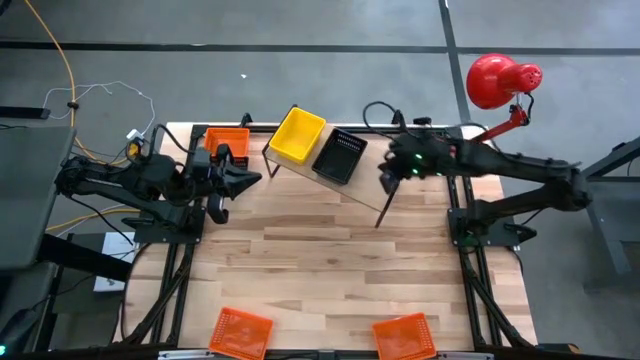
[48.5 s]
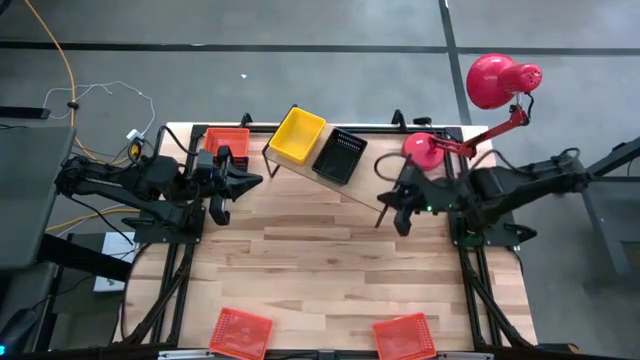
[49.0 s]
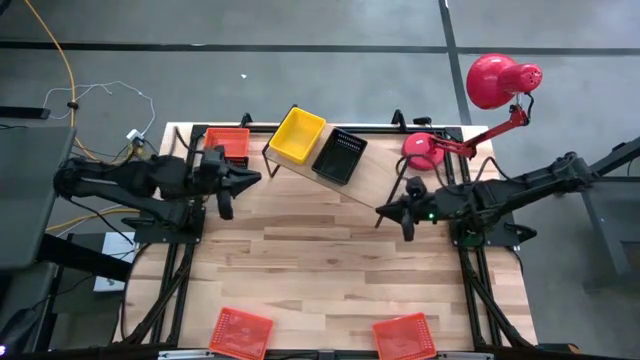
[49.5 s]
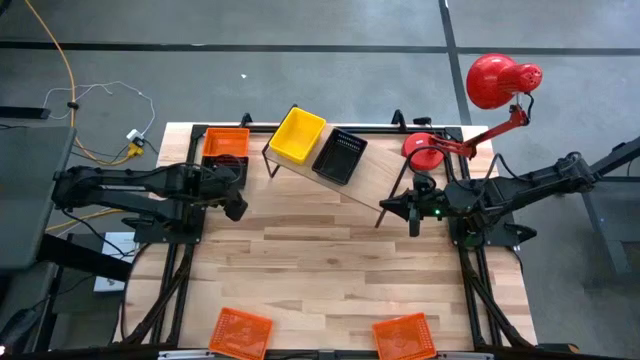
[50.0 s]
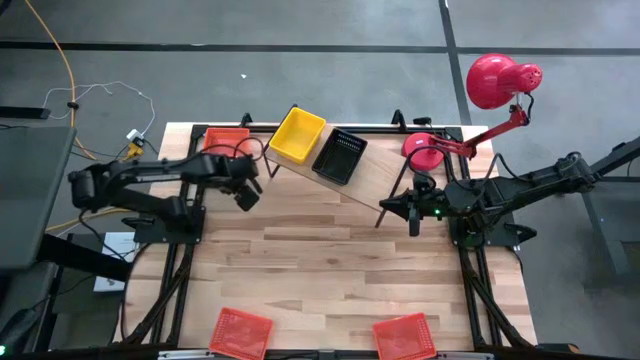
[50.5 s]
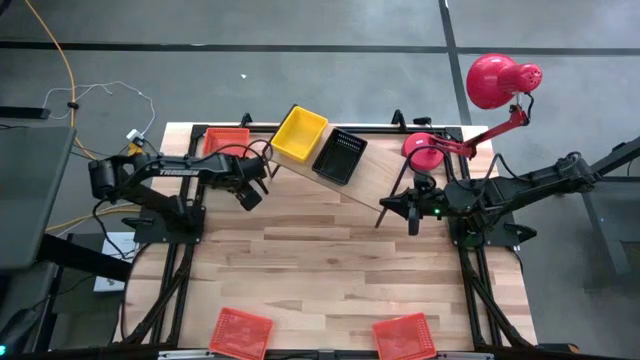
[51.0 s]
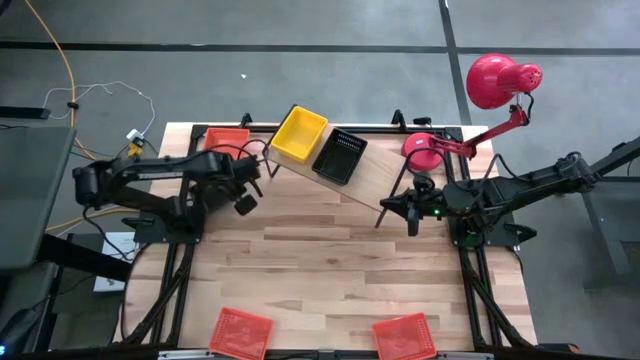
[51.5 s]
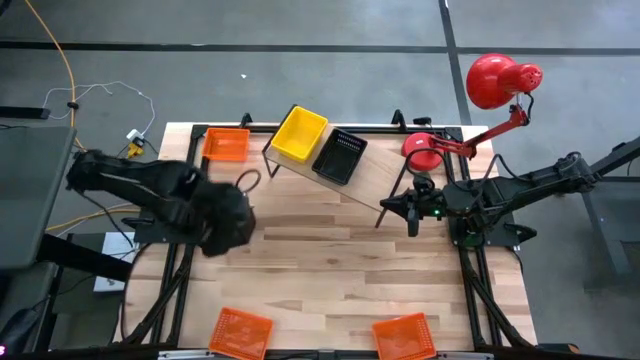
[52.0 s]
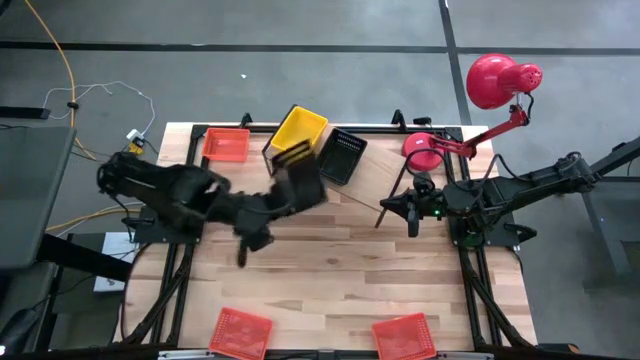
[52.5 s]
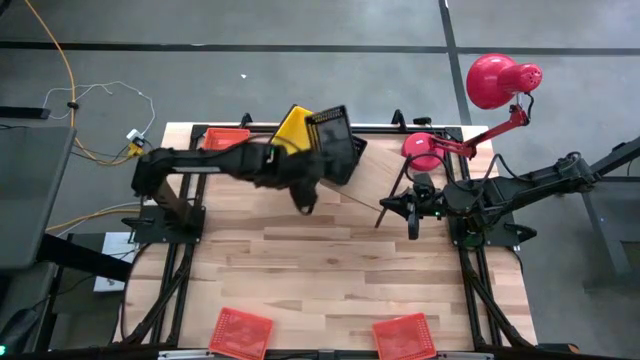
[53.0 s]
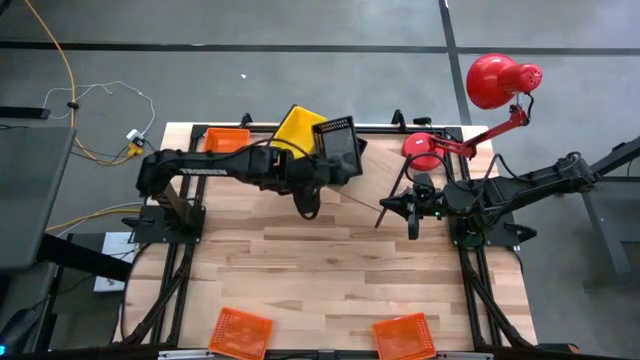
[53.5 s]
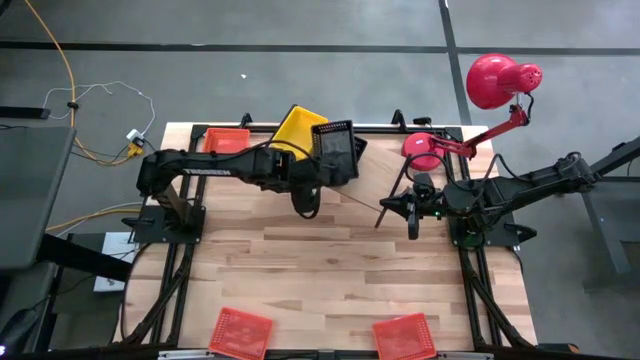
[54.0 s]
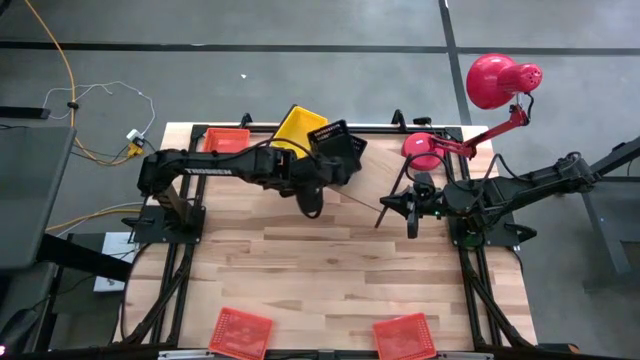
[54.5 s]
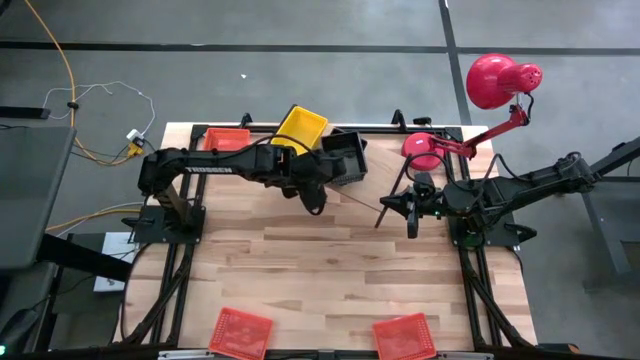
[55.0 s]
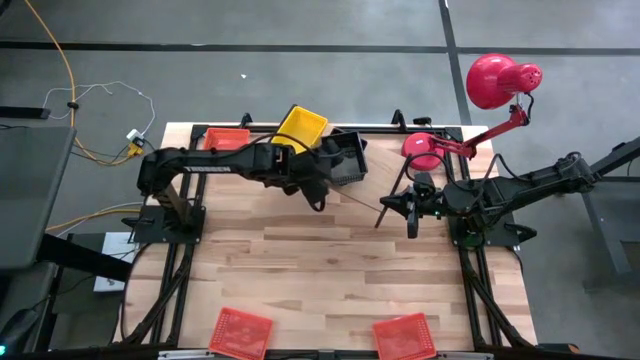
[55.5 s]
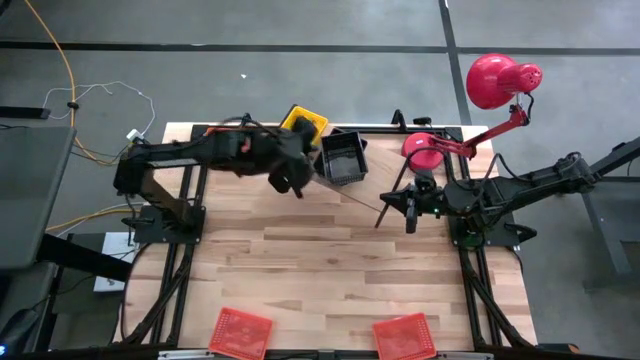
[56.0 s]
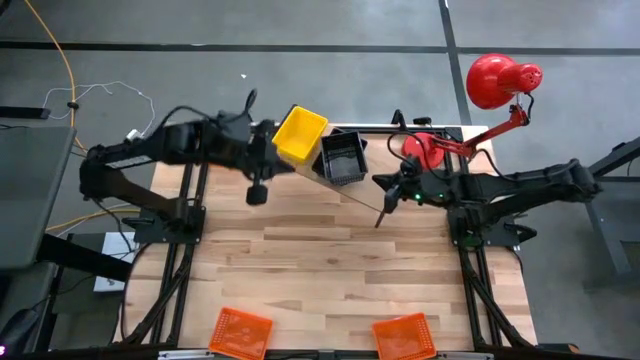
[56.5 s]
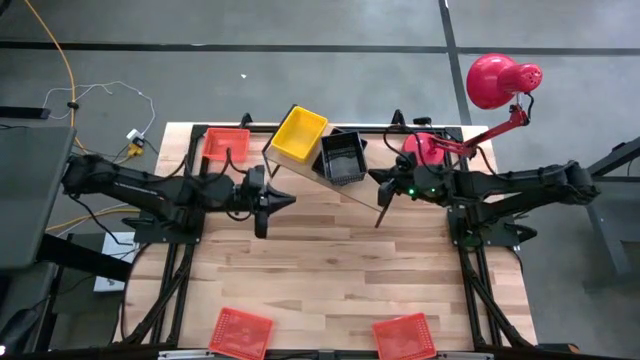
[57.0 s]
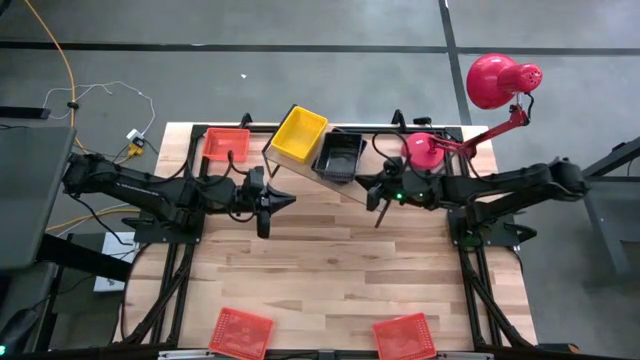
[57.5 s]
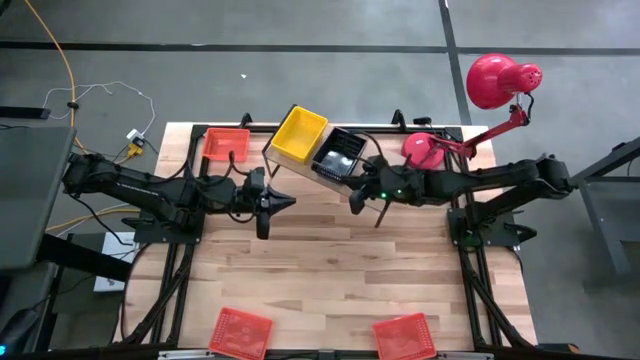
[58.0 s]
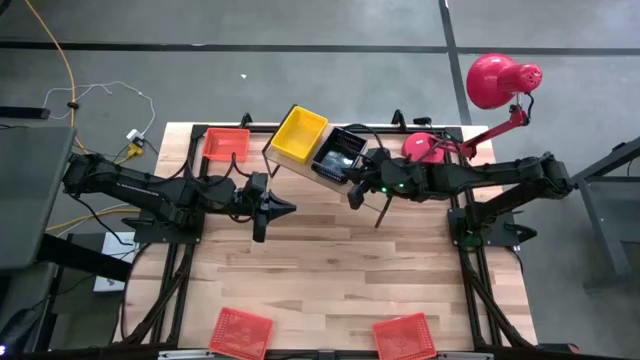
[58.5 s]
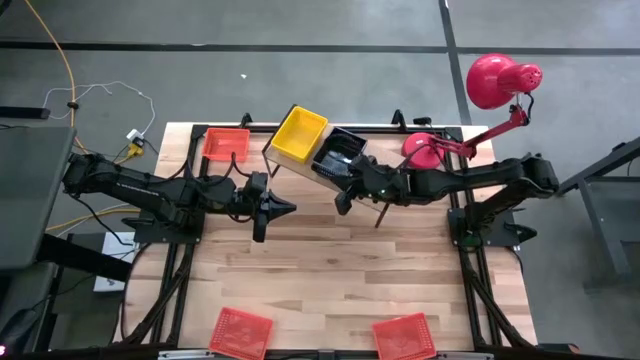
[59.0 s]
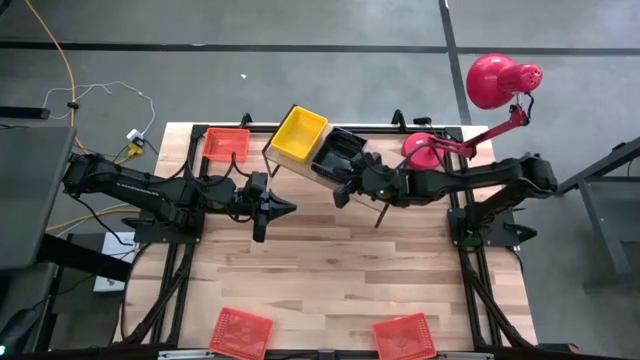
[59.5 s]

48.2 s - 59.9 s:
Task: Stack baskets on shelf by color
Stack the black bin on top of the black bin on the shelf

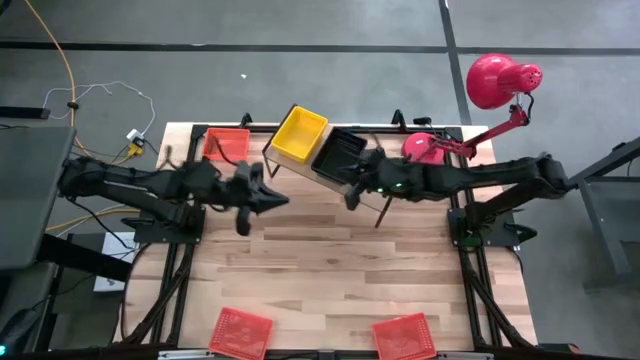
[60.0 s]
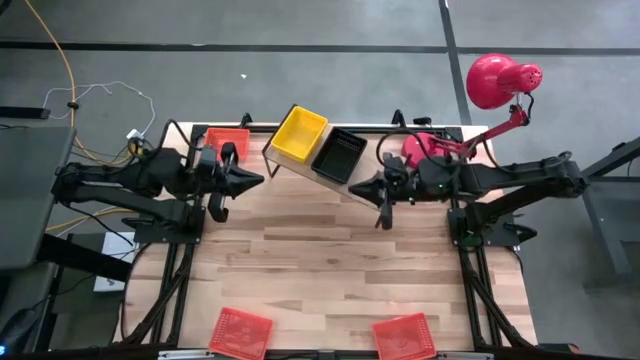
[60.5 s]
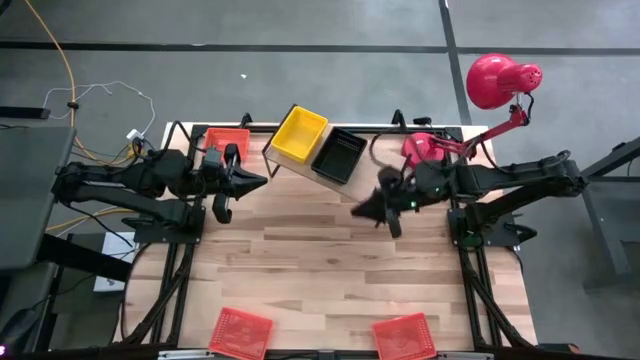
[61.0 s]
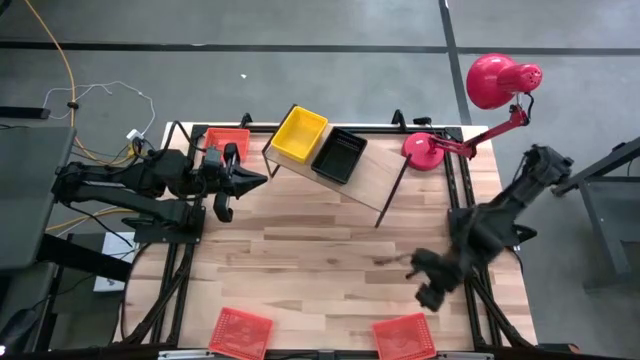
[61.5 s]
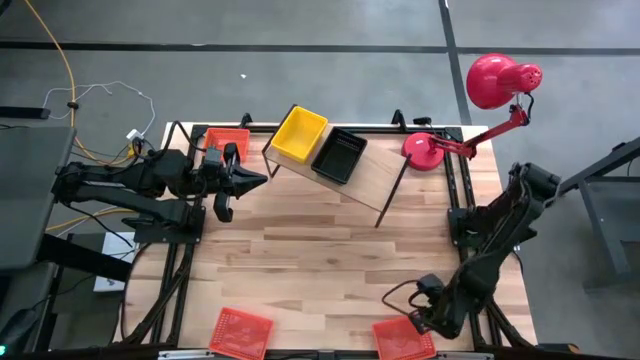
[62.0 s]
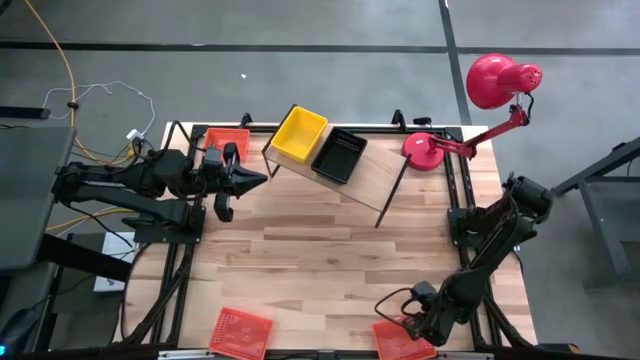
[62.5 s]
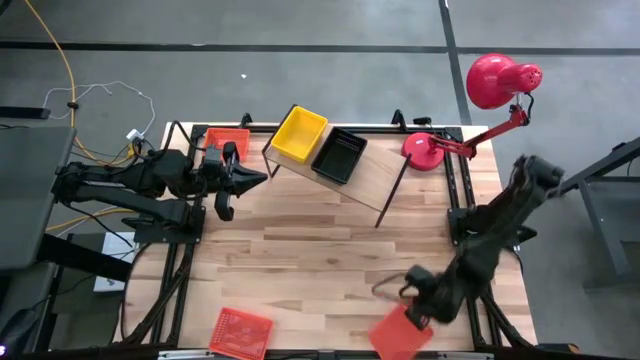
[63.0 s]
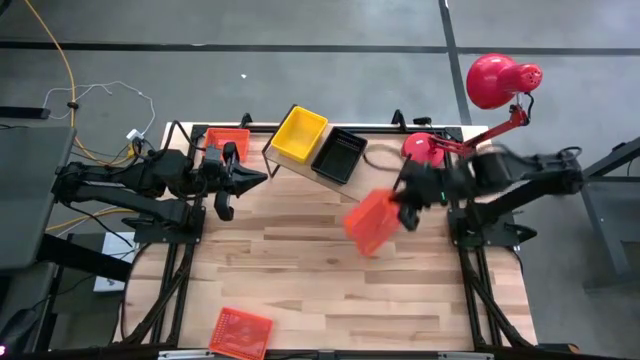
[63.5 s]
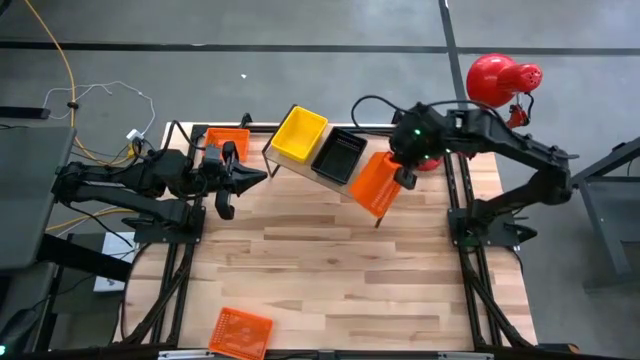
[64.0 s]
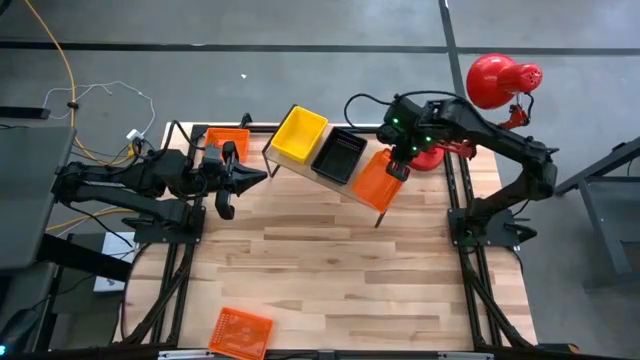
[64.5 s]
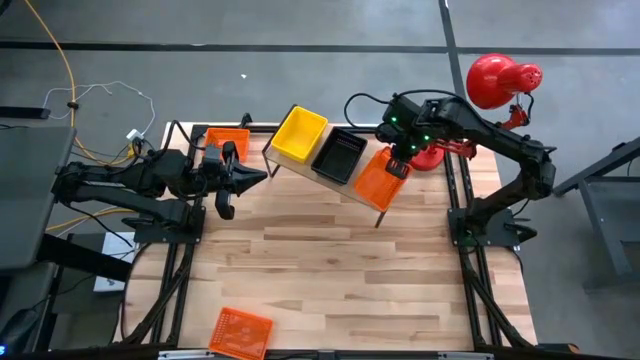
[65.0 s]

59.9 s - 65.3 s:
Put the bottom right orange bin on the shelf

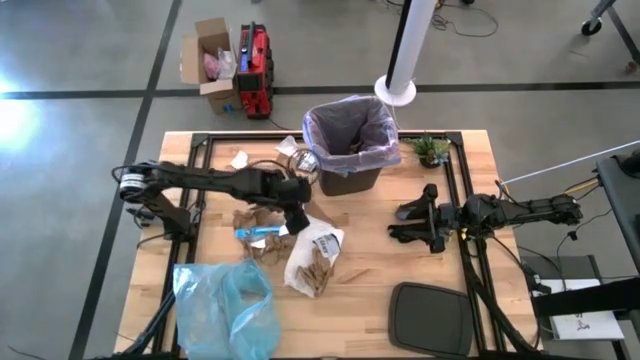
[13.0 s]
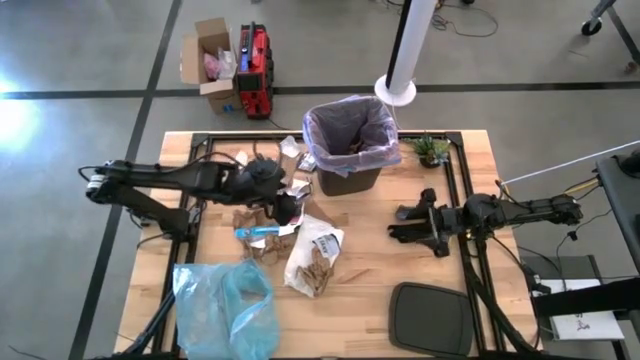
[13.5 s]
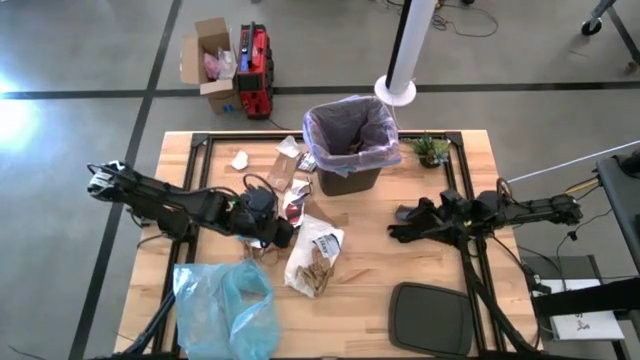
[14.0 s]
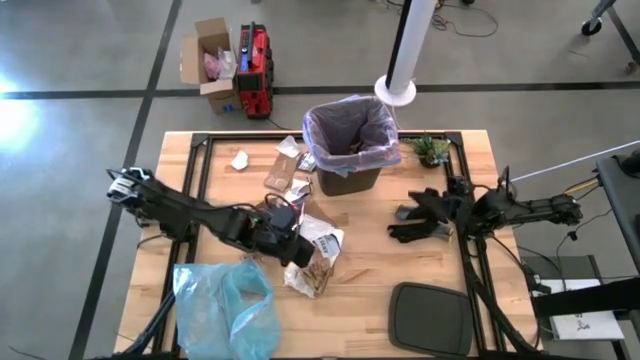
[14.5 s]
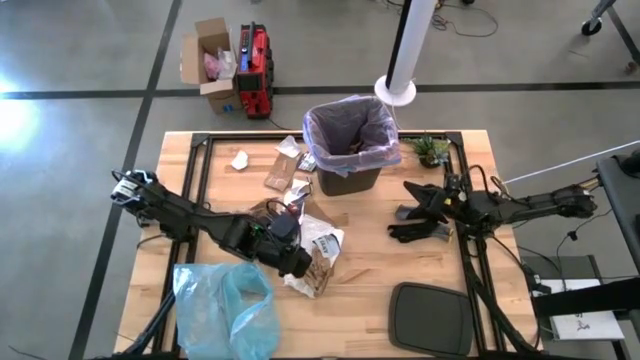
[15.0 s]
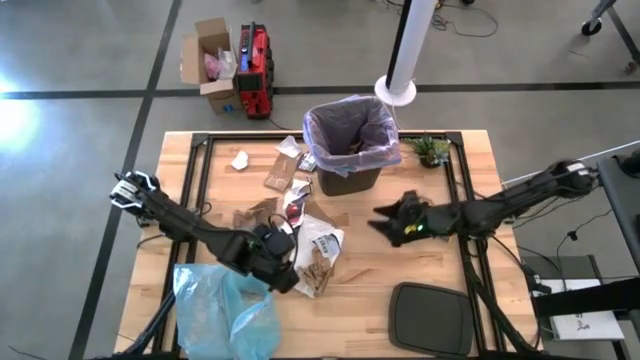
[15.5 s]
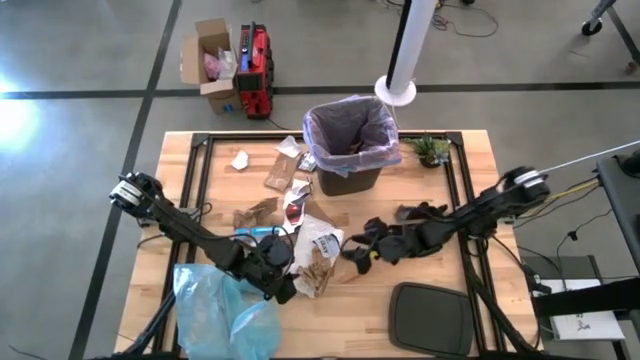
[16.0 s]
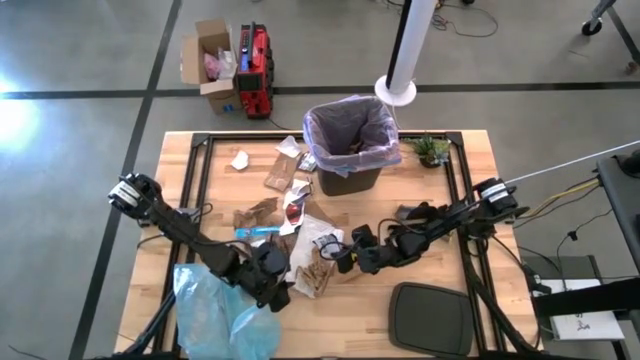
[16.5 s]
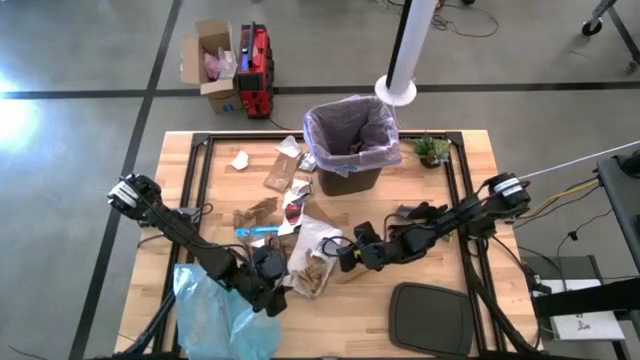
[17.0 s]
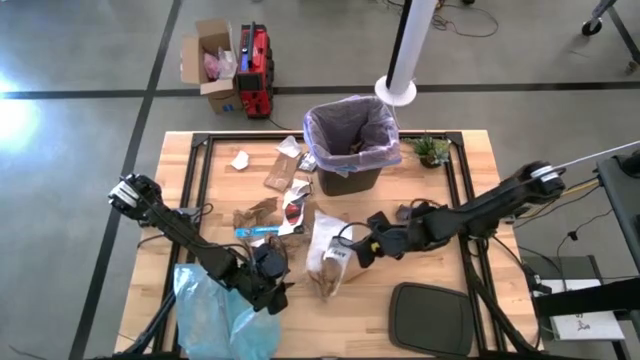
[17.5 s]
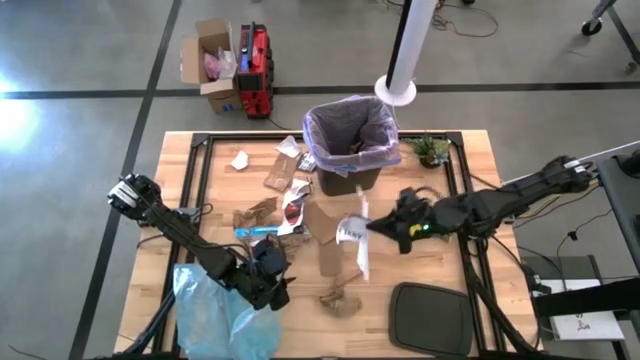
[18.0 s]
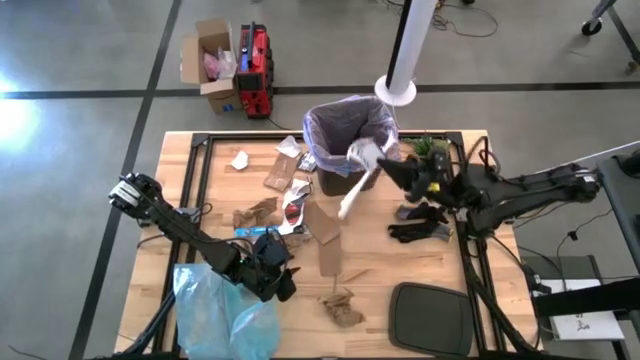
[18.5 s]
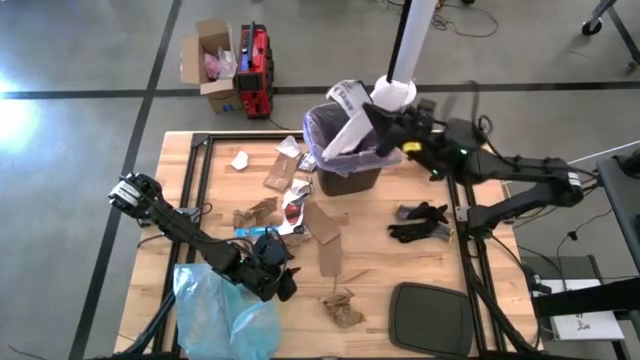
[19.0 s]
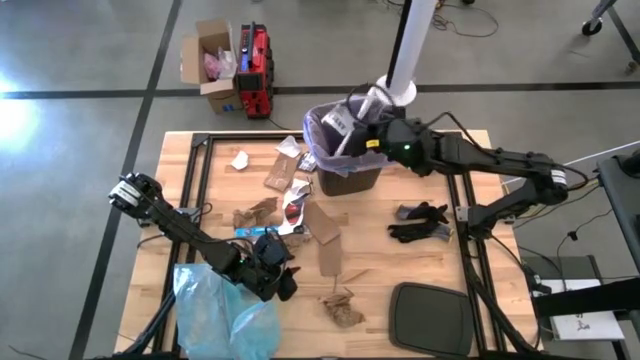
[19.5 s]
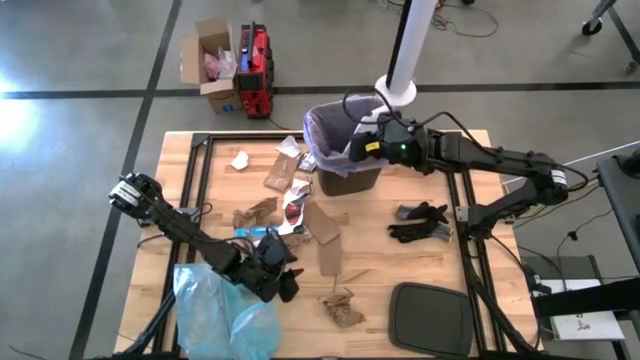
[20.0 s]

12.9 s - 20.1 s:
Task: place trash/remove bag and relplace
Put the white paper and bubble wrap into the trash bin
